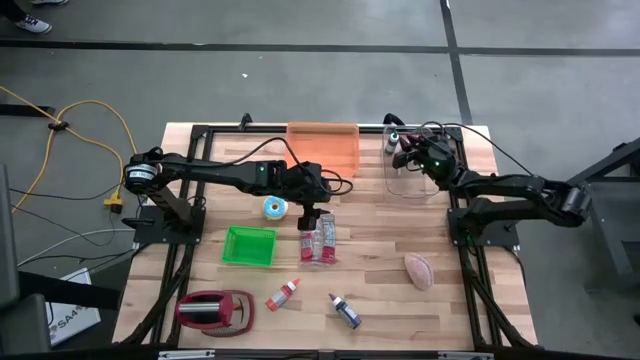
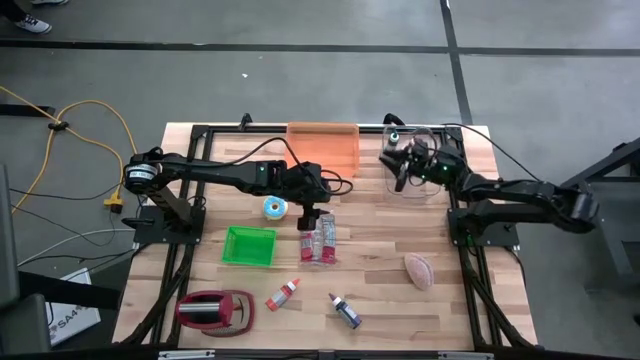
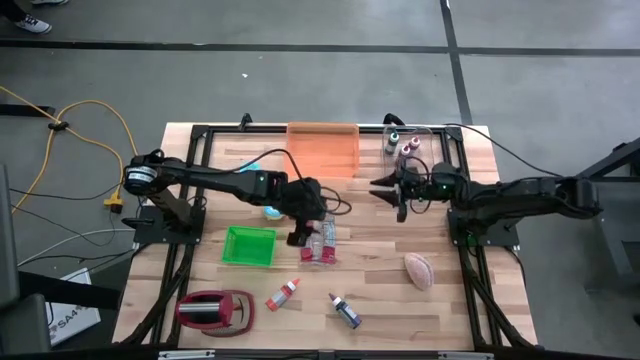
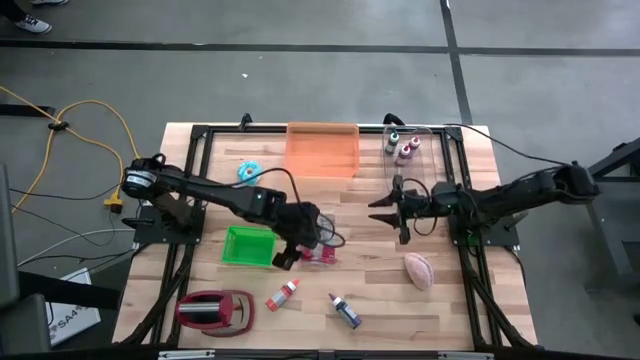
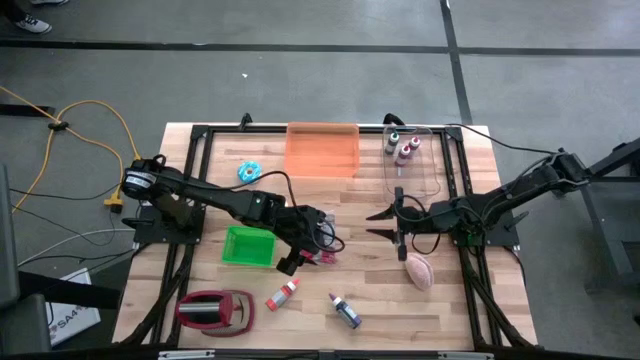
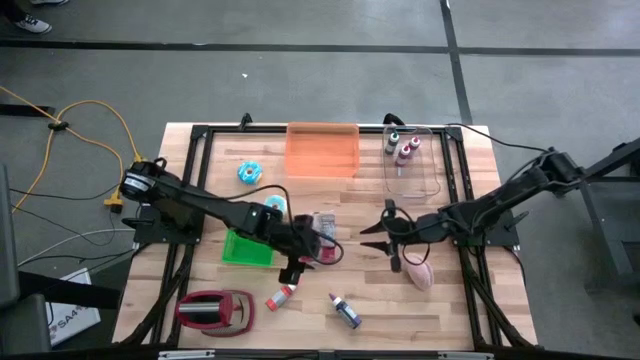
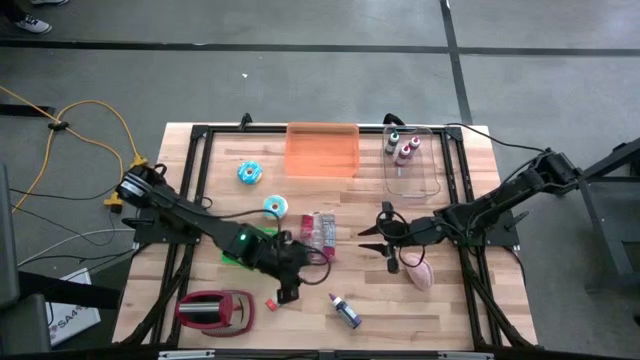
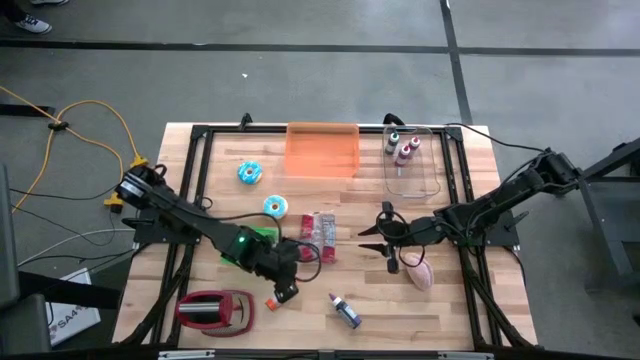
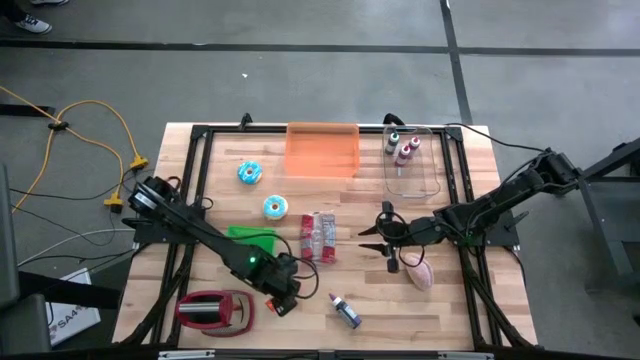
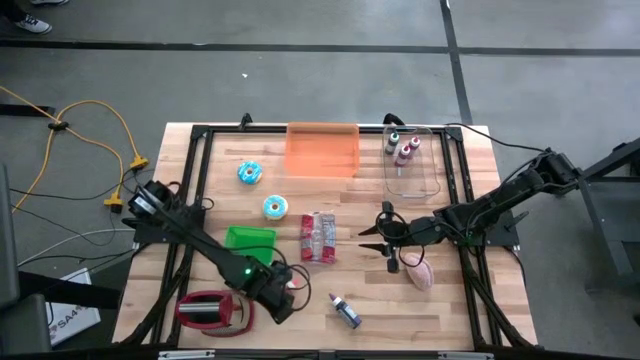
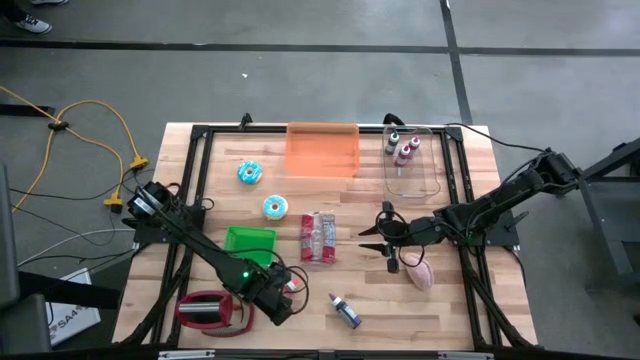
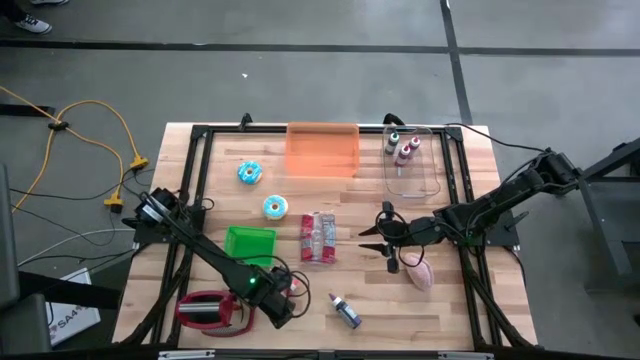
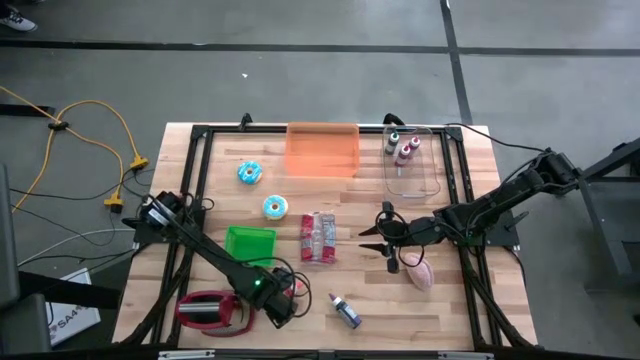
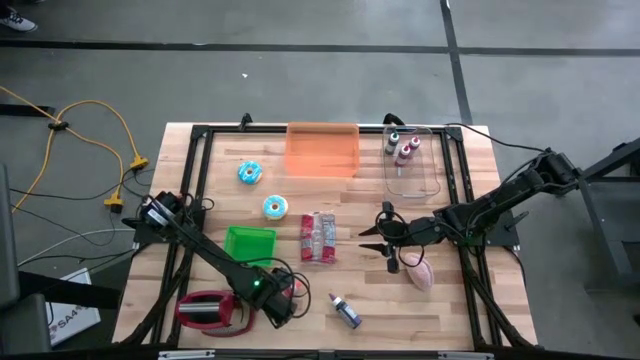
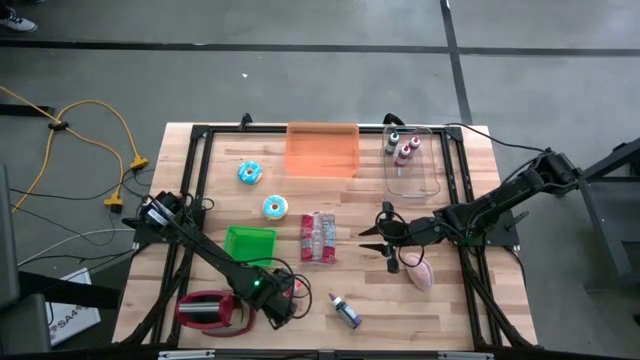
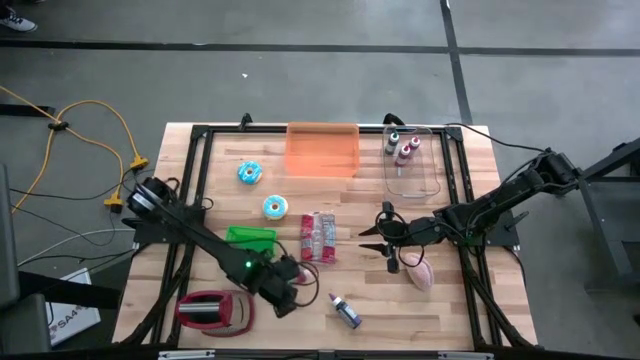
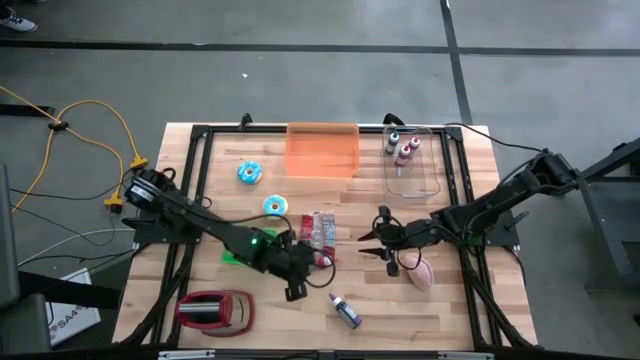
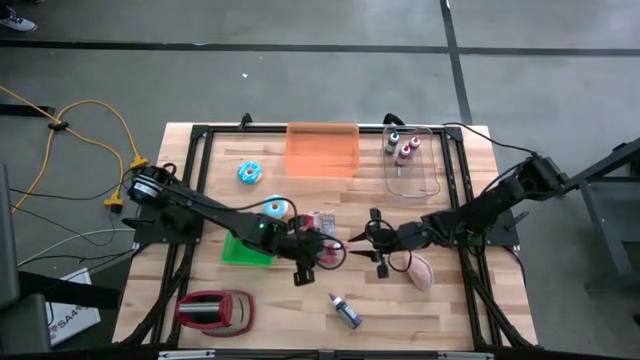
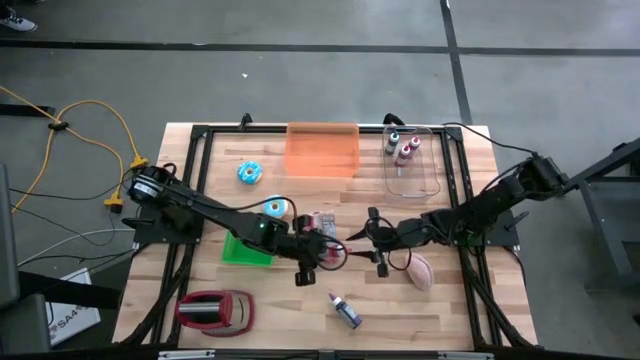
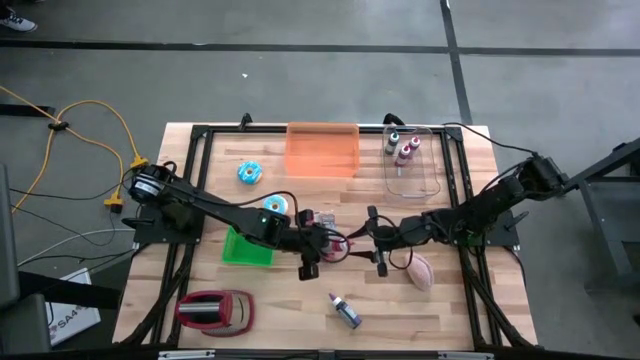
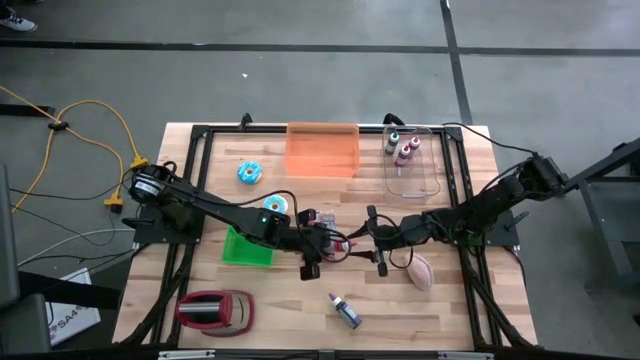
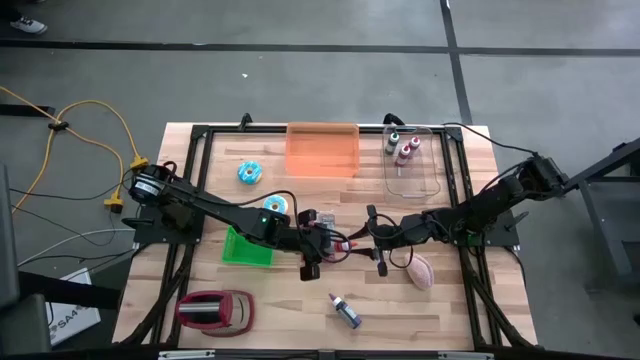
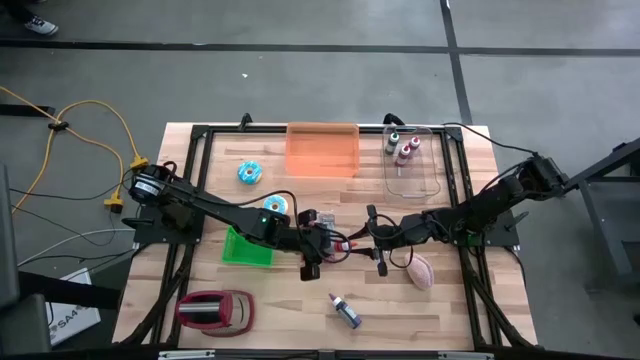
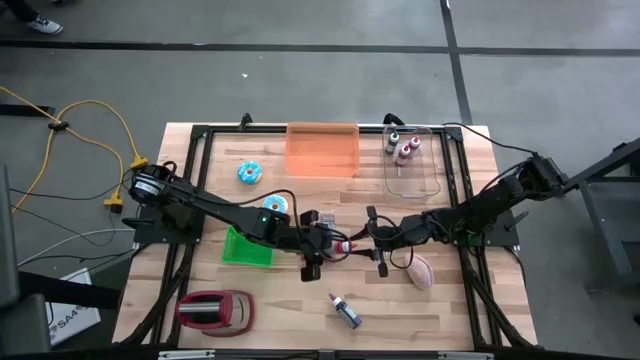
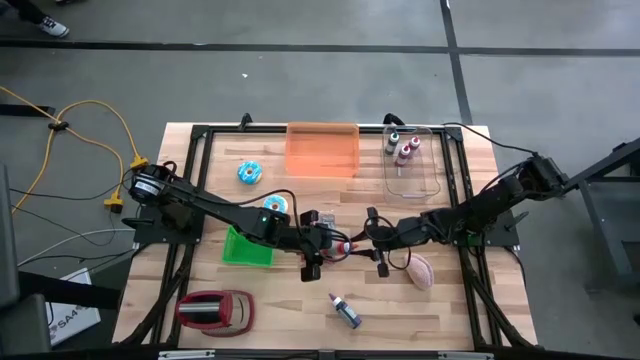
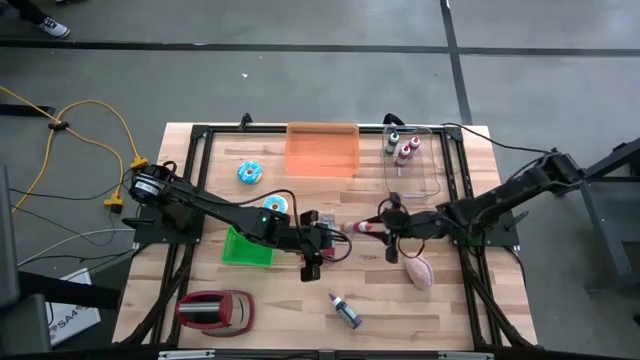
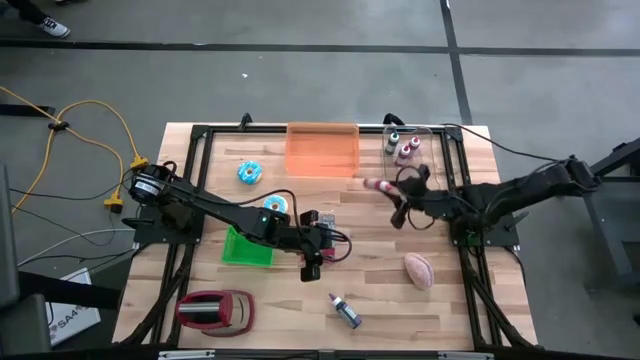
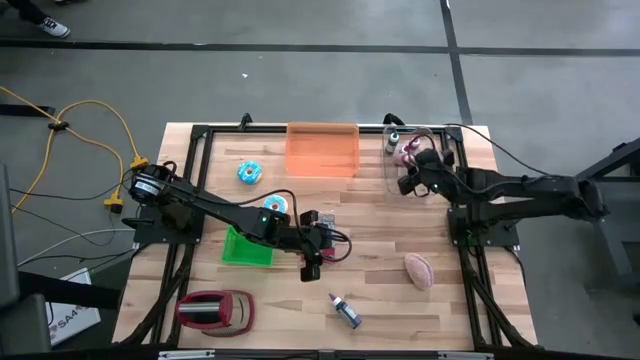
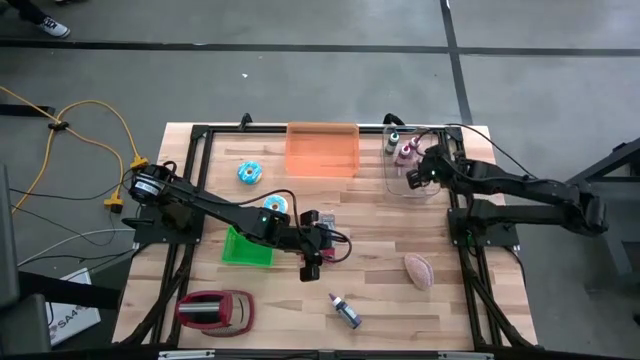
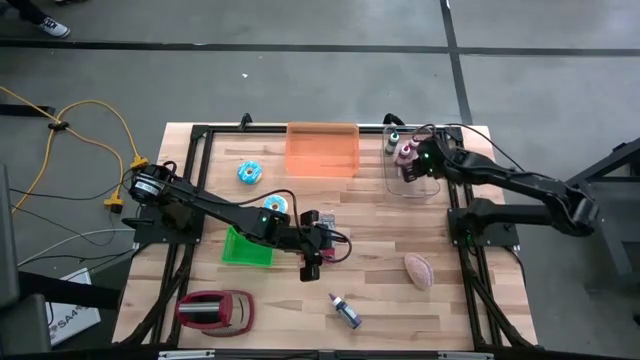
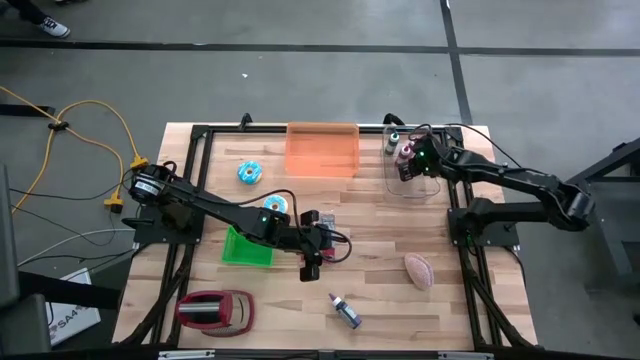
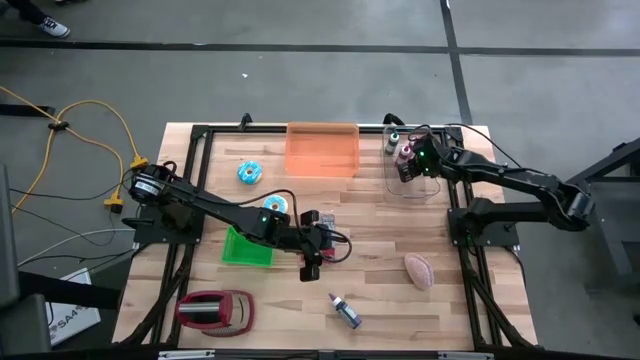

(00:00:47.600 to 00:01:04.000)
Put the orange food coloring bottle into the transparent bin
